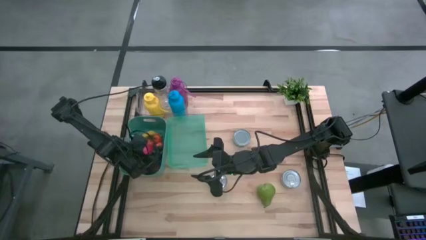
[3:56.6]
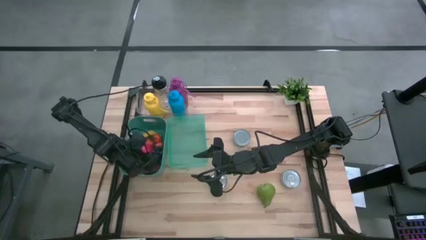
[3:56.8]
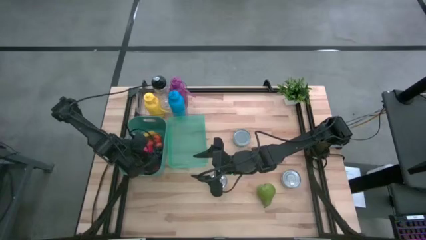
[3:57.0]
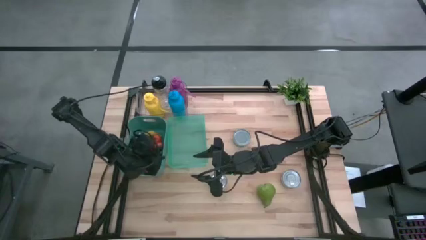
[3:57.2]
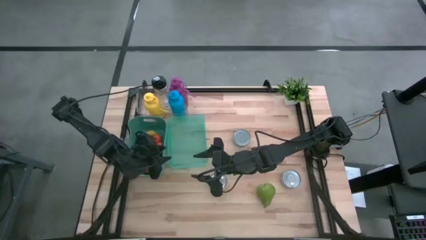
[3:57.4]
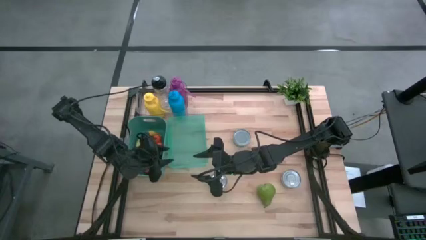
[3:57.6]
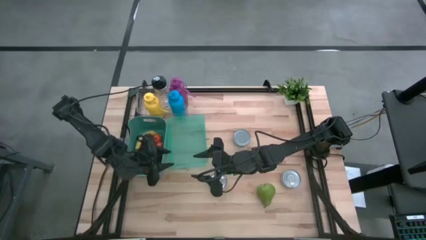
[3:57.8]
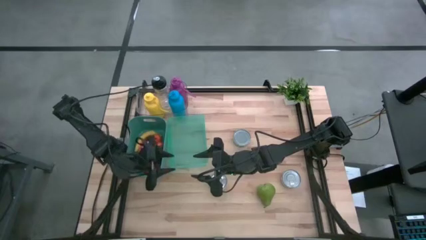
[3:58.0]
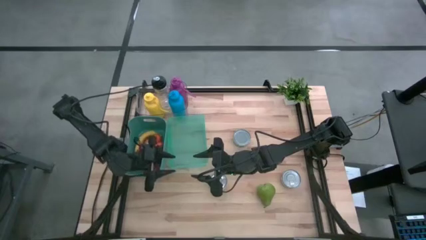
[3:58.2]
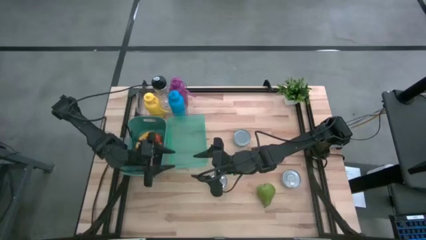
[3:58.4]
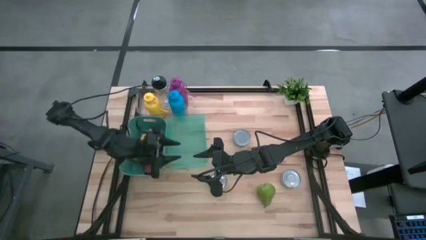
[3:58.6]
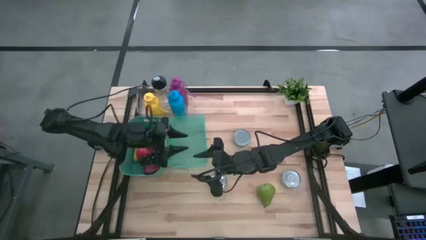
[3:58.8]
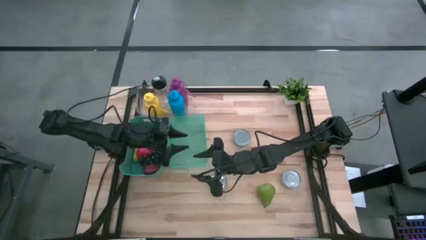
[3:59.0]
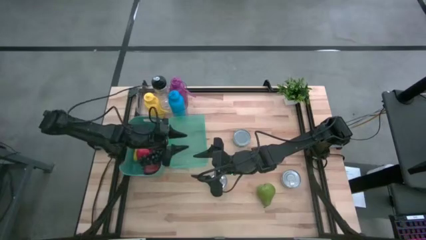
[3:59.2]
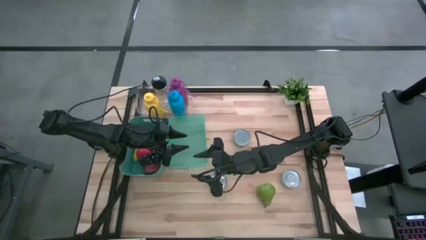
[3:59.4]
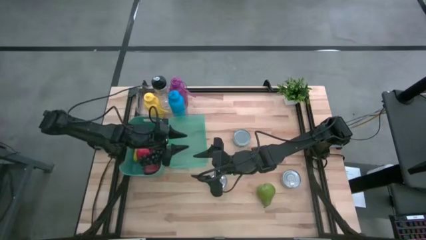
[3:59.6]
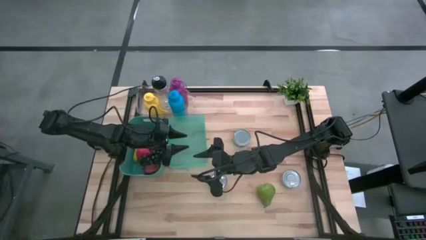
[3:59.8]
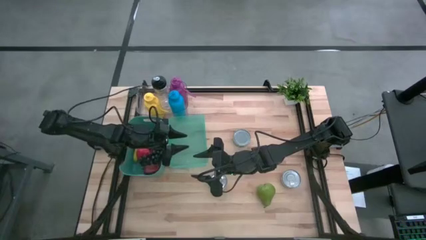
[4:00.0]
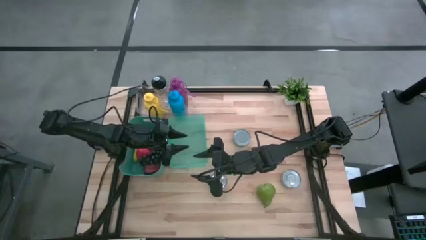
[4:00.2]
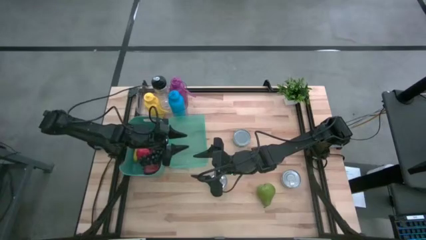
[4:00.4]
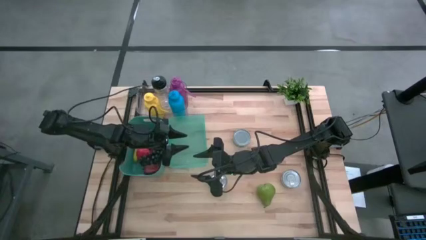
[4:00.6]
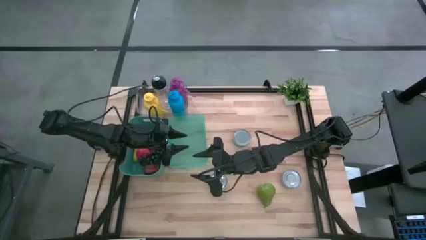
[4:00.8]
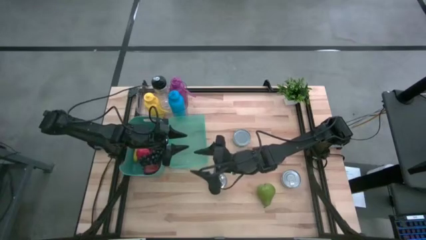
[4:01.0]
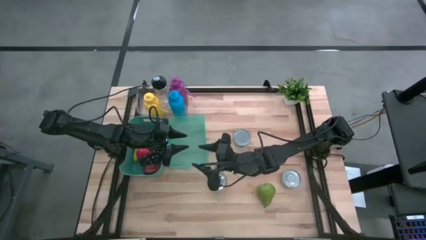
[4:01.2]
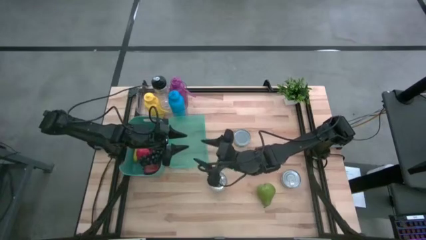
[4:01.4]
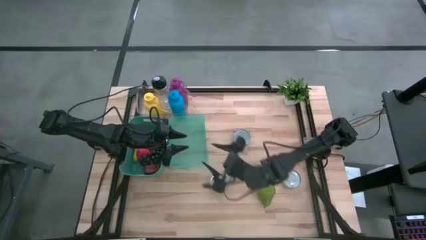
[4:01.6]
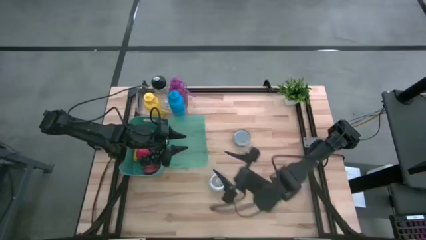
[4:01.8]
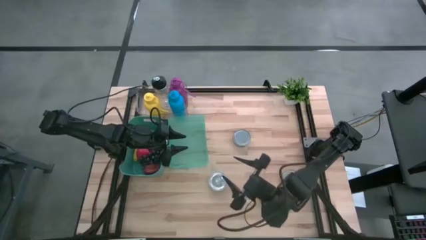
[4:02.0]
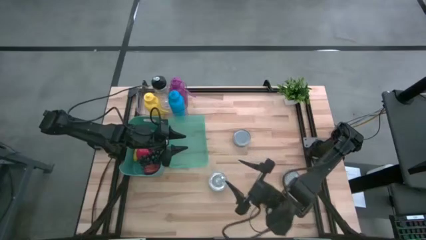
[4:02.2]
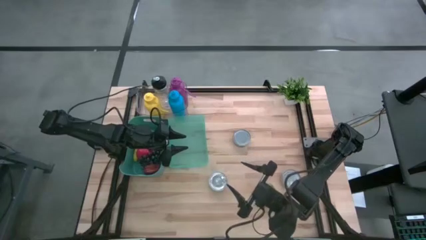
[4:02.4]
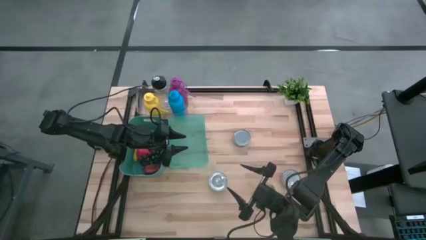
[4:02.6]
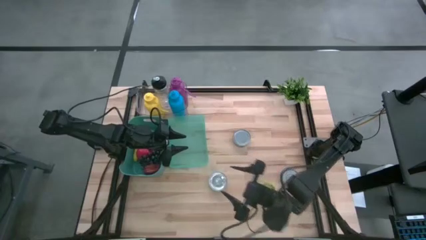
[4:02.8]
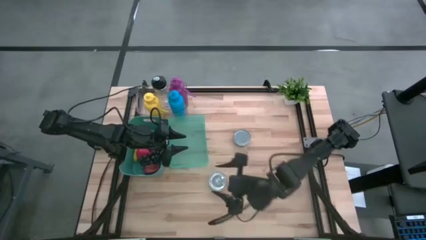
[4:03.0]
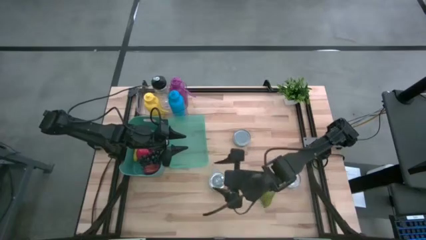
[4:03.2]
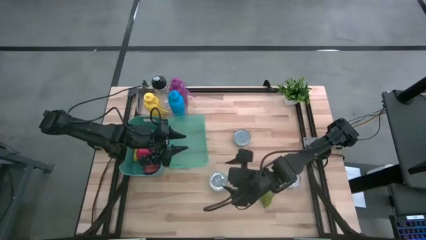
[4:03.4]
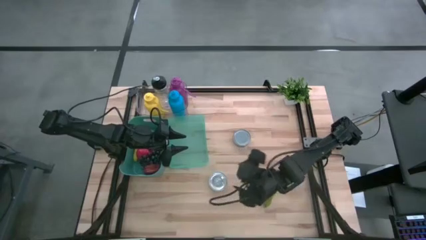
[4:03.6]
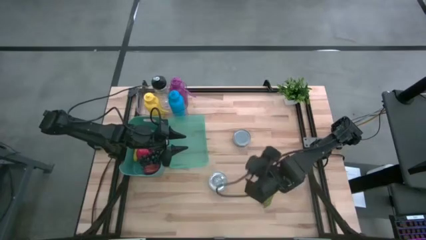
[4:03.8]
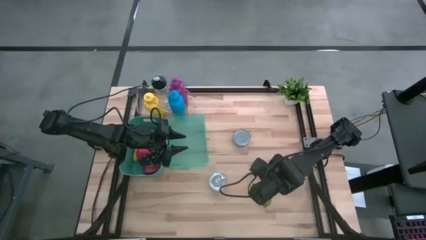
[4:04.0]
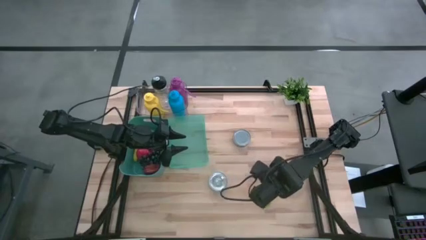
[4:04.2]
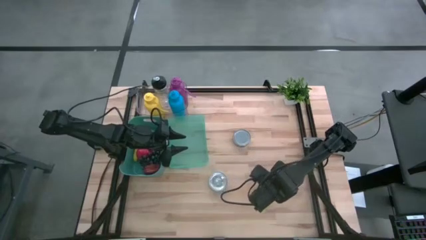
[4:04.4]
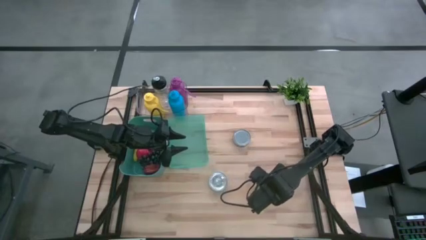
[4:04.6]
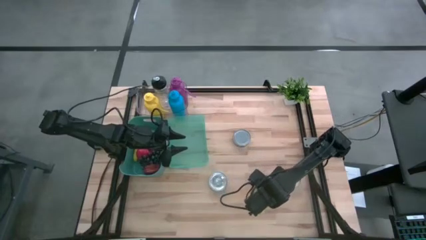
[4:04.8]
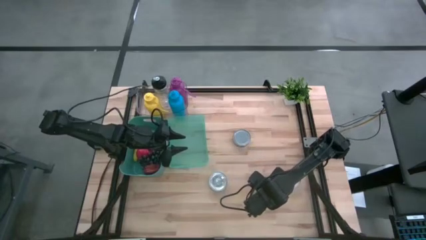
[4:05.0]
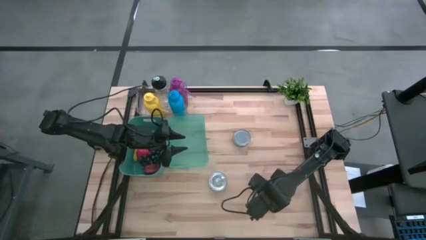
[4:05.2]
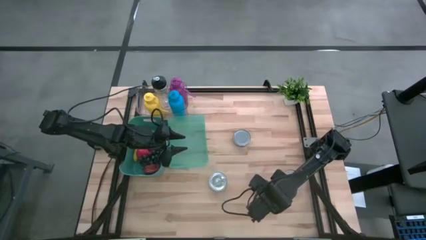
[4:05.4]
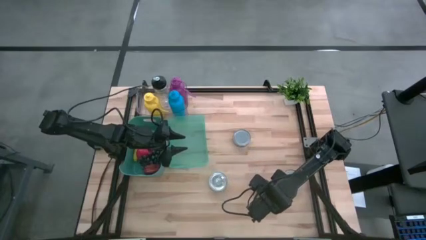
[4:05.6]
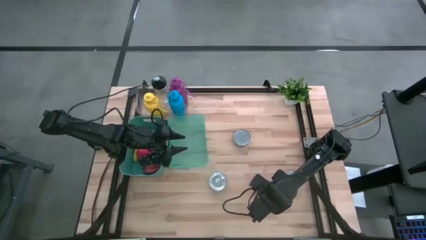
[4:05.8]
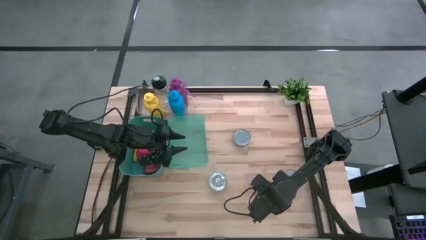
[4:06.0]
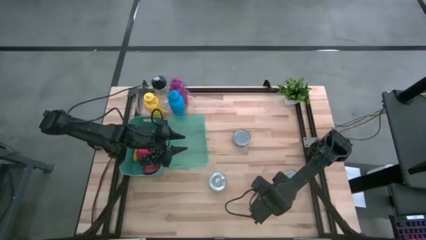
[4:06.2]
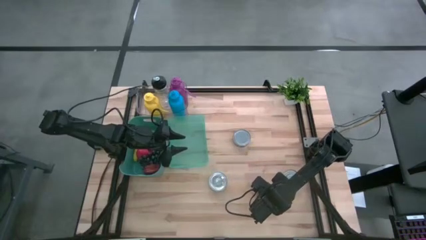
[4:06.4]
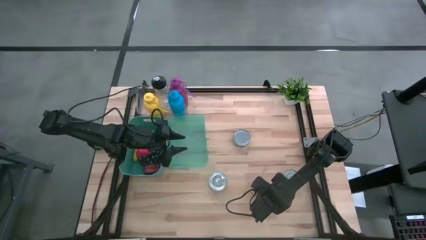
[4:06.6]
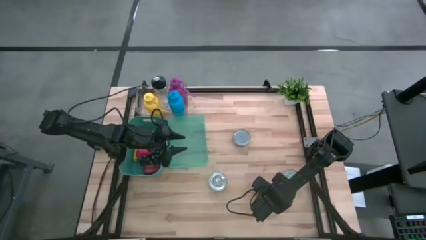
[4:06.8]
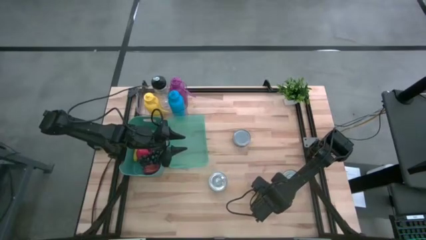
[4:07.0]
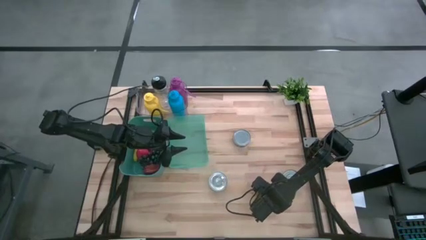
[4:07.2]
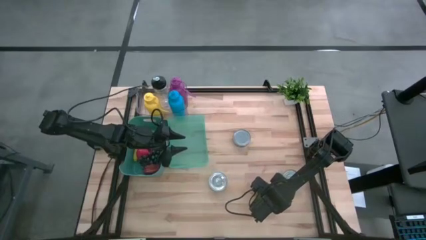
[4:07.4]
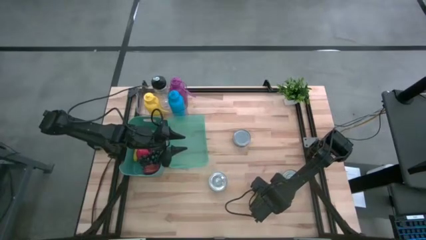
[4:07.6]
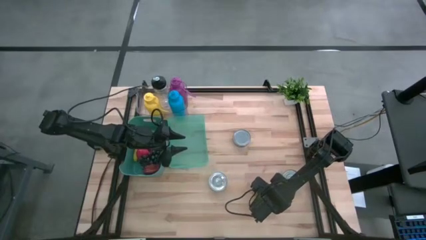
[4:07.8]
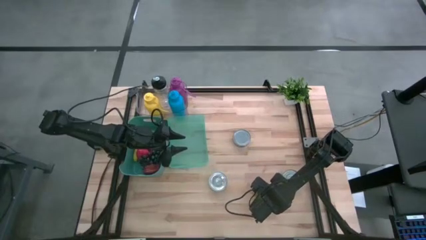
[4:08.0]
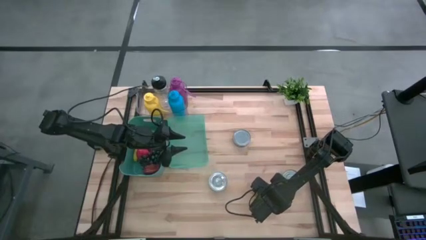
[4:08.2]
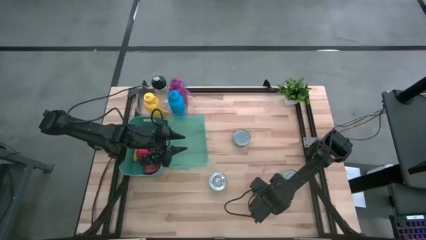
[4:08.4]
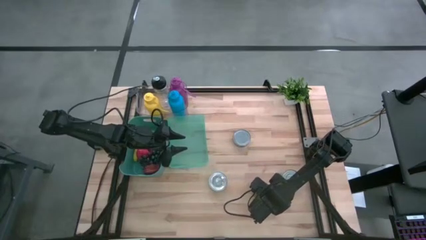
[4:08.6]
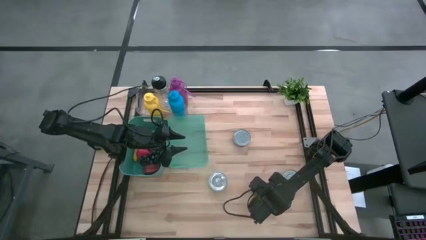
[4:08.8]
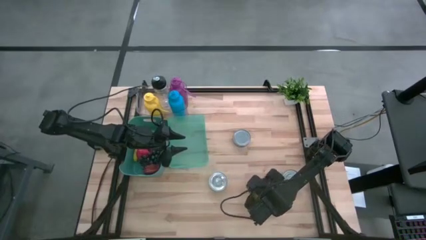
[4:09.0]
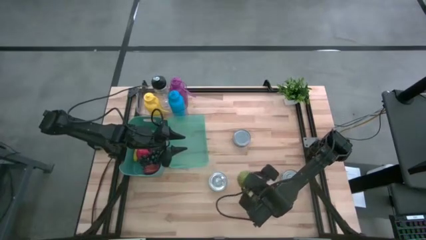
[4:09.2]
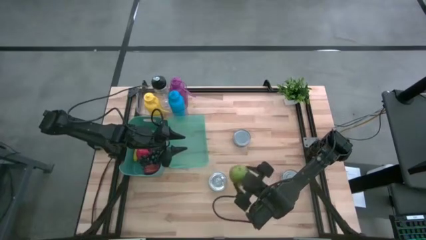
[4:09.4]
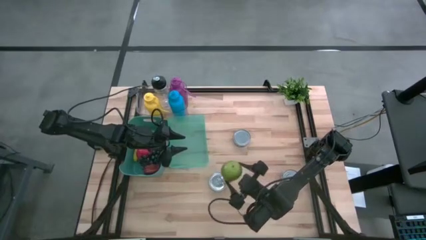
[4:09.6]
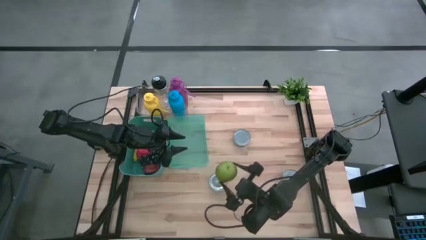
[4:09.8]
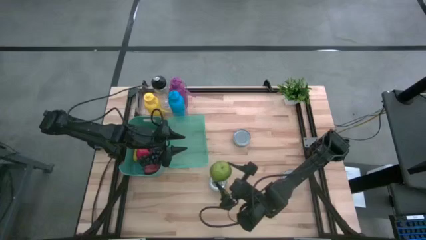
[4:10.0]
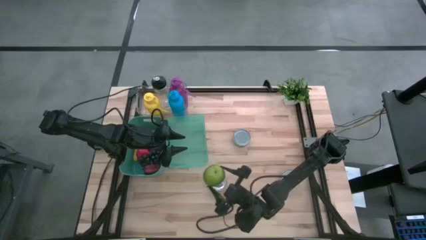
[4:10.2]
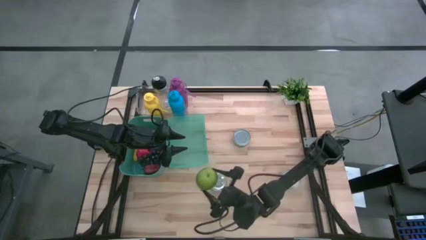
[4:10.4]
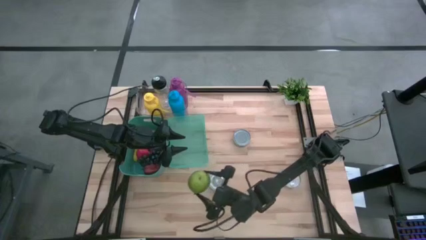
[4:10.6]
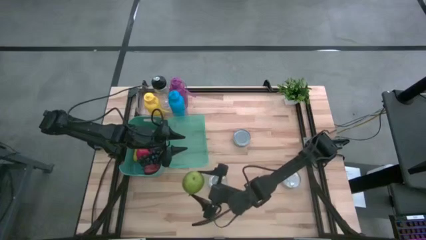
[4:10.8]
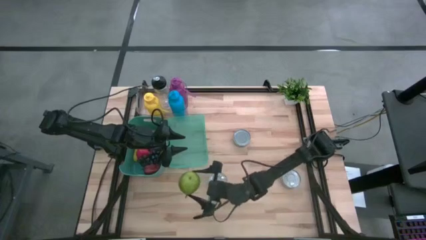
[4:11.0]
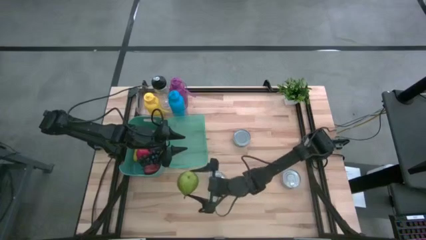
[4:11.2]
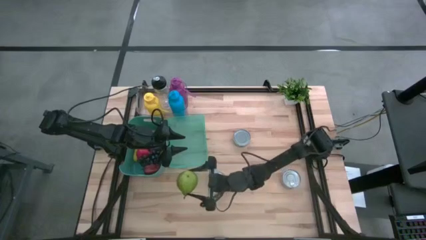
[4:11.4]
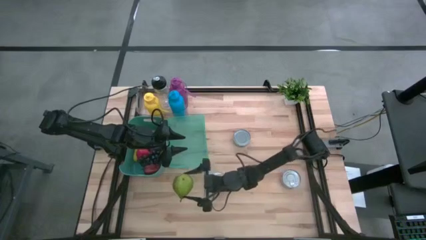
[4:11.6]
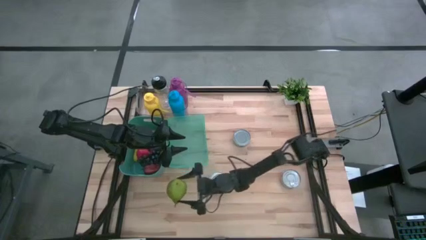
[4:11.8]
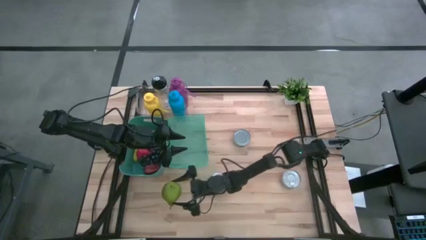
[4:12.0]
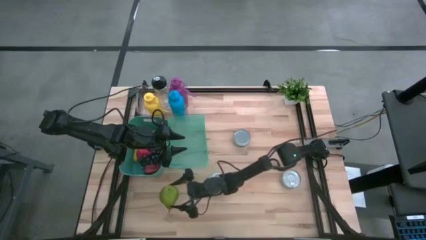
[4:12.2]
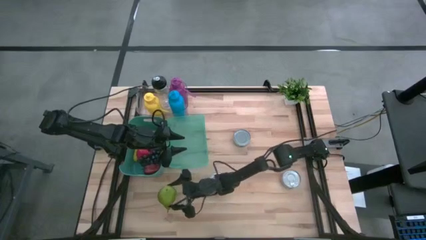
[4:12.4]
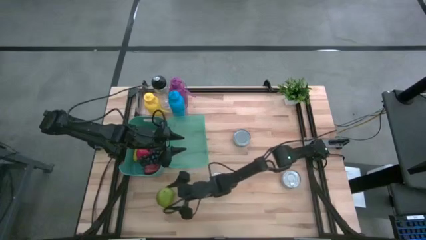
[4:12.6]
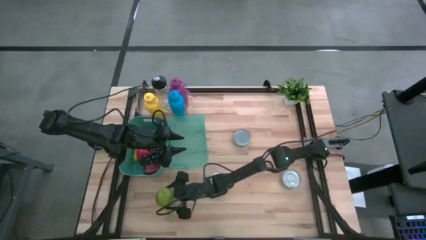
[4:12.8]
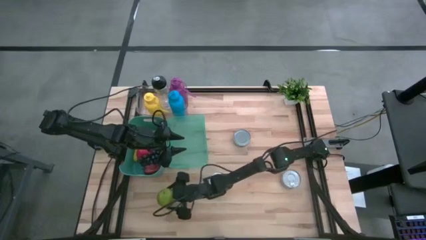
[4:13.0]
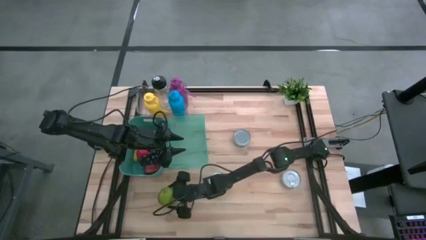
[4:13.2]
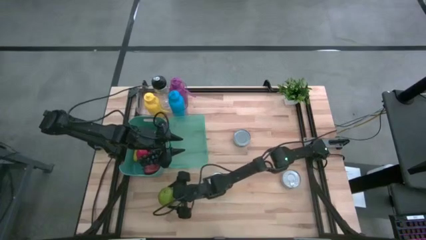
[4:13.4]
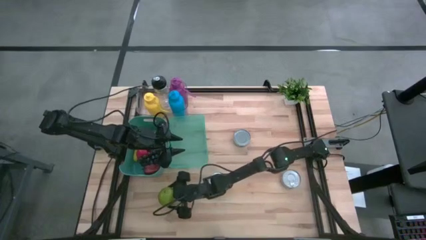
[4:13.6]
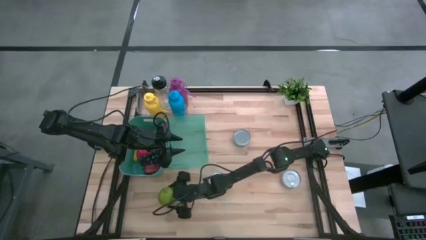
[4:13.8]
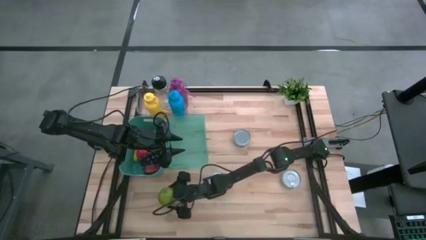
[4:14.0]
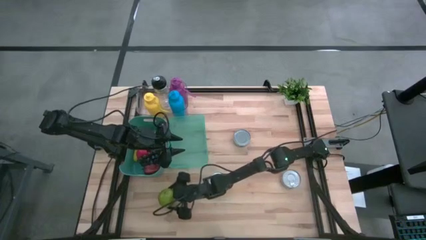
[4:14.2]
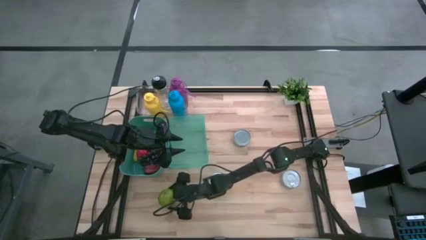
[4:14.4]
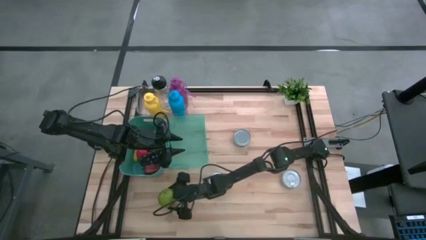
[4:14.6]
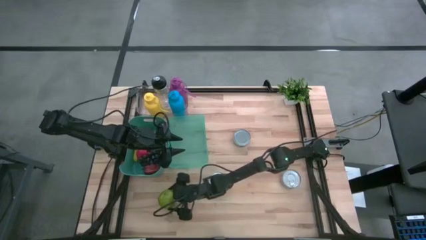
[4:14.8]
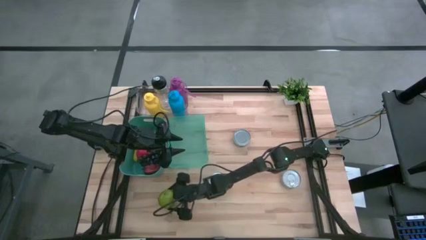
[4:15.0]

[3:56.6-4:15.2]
Task: Pick & Place Food Item
Put the pear into the green bin
